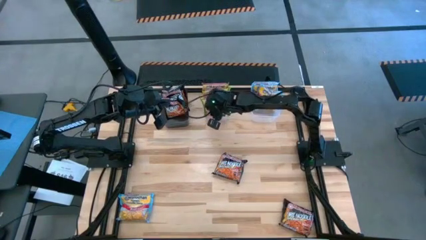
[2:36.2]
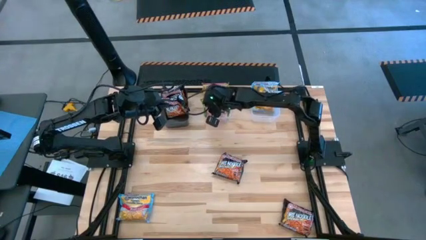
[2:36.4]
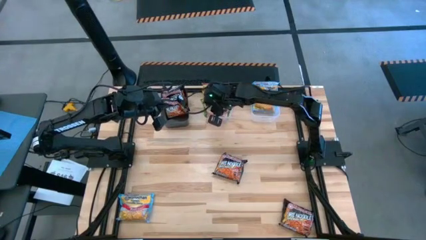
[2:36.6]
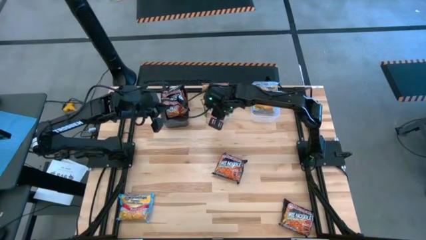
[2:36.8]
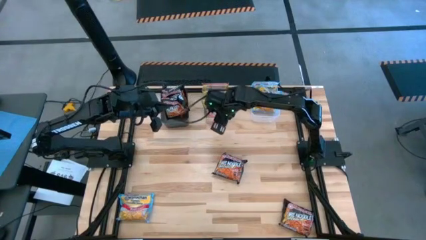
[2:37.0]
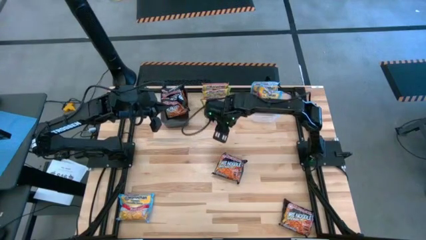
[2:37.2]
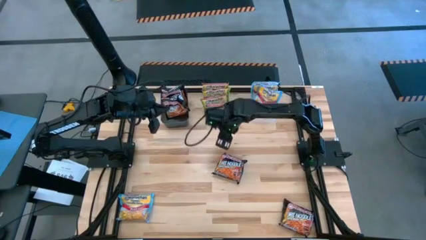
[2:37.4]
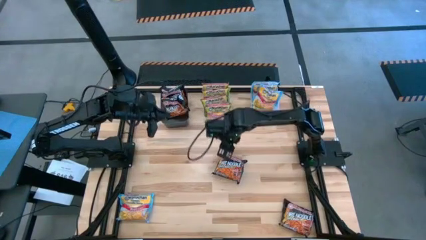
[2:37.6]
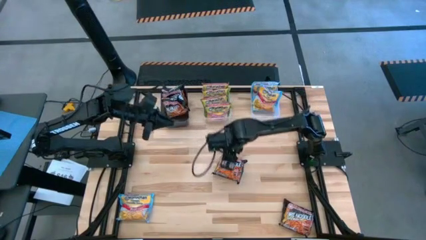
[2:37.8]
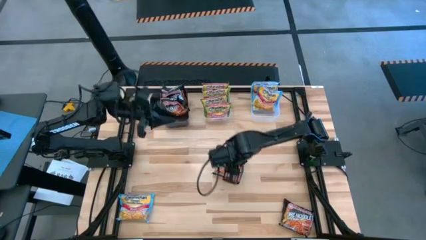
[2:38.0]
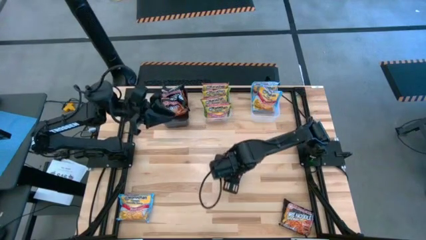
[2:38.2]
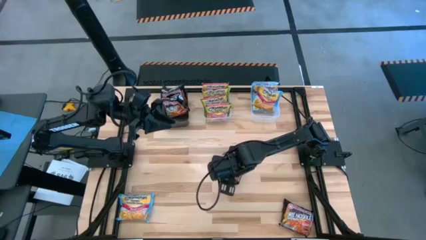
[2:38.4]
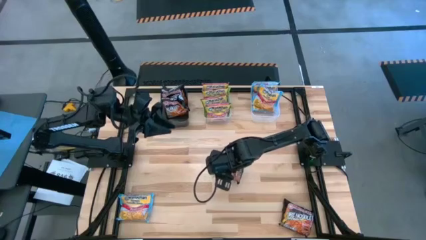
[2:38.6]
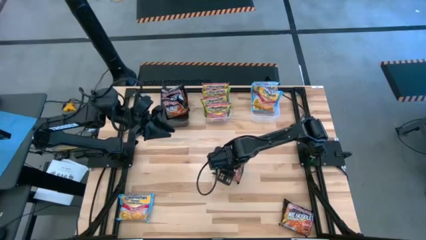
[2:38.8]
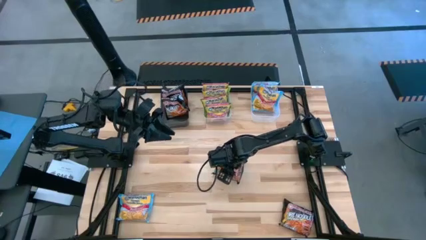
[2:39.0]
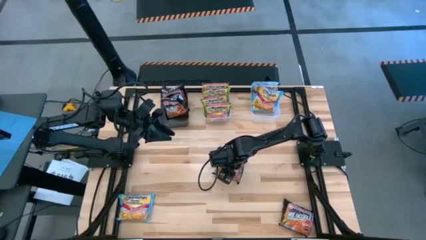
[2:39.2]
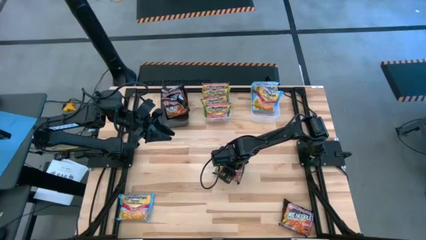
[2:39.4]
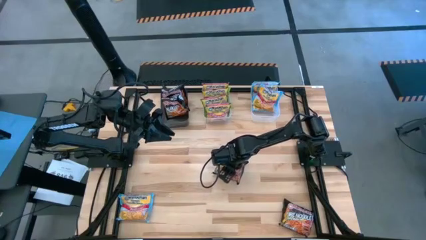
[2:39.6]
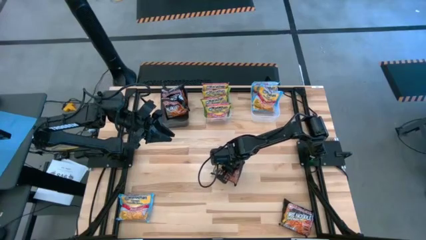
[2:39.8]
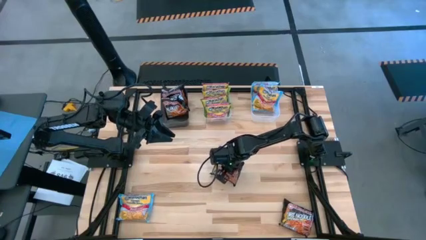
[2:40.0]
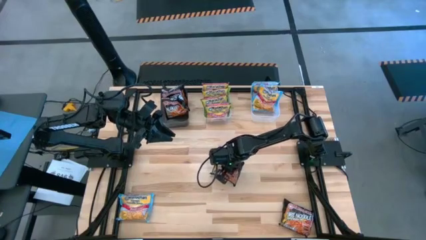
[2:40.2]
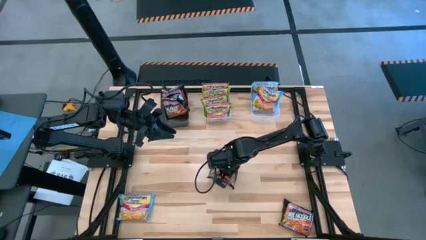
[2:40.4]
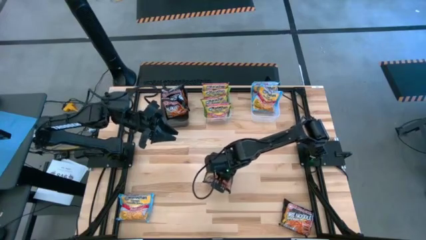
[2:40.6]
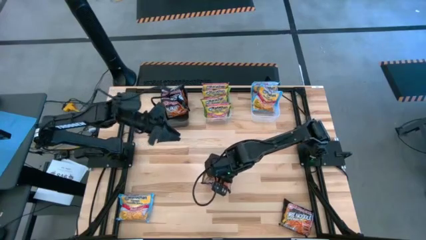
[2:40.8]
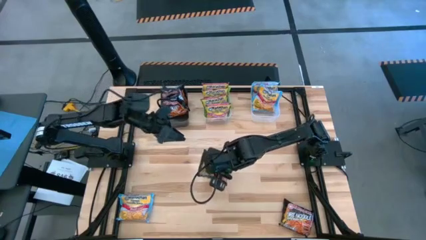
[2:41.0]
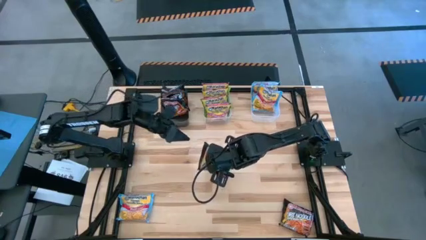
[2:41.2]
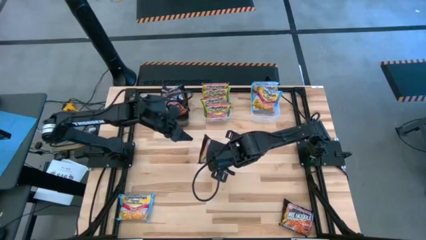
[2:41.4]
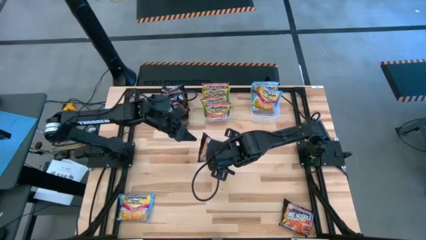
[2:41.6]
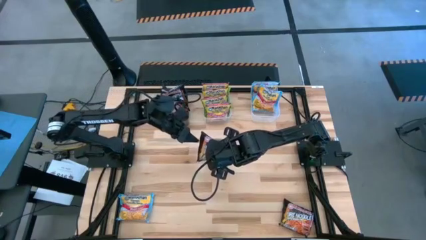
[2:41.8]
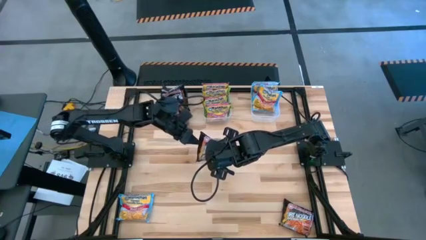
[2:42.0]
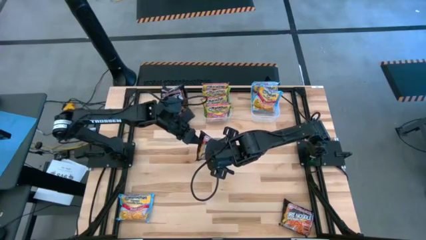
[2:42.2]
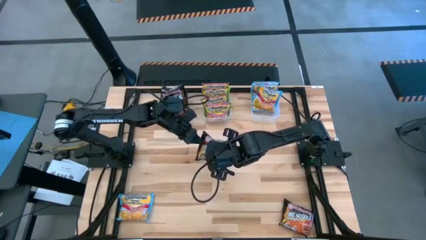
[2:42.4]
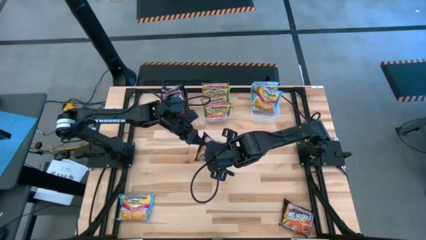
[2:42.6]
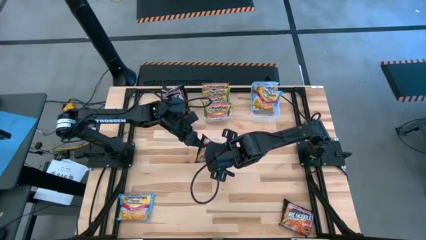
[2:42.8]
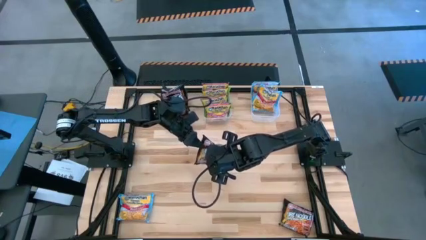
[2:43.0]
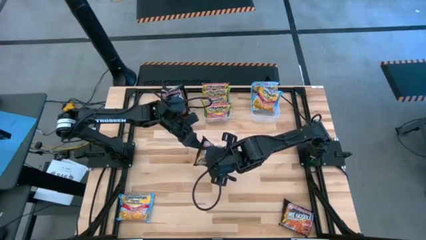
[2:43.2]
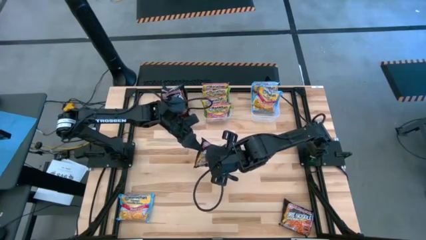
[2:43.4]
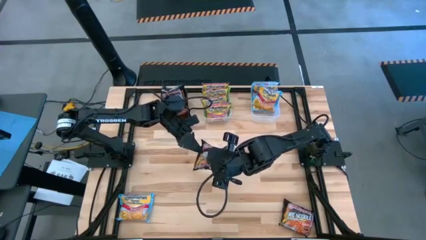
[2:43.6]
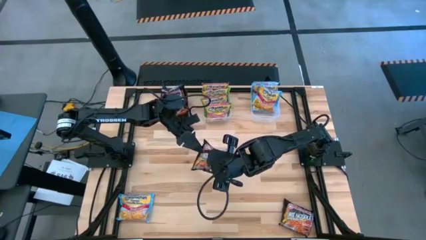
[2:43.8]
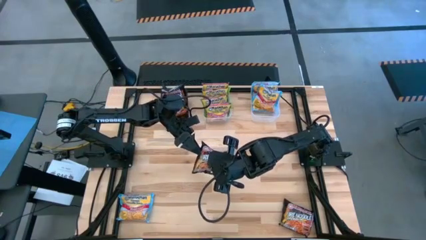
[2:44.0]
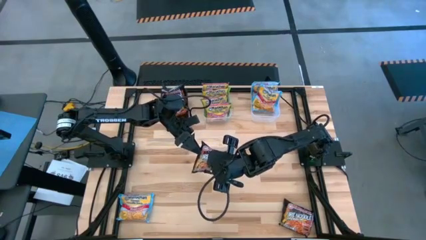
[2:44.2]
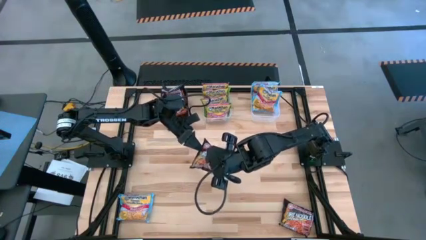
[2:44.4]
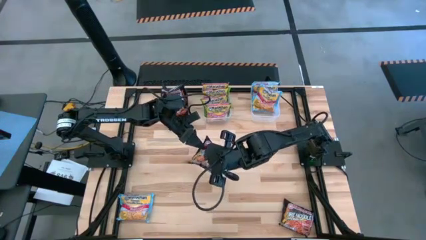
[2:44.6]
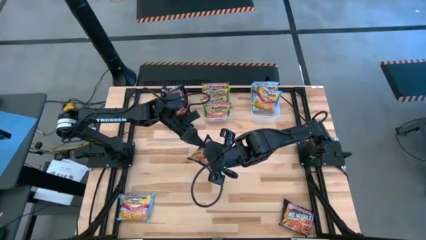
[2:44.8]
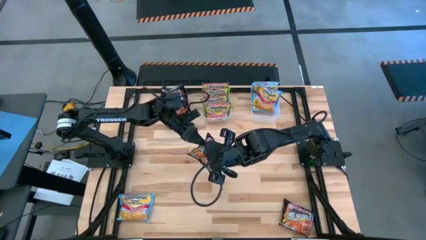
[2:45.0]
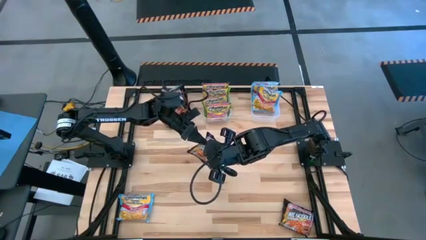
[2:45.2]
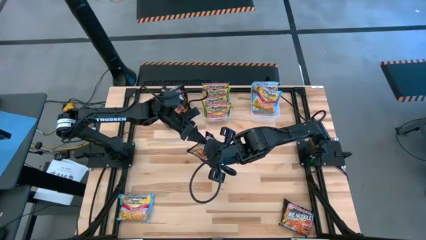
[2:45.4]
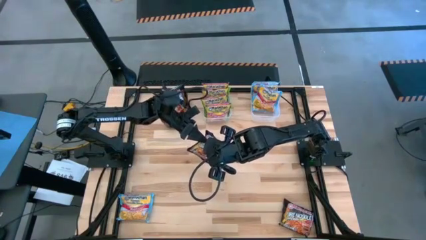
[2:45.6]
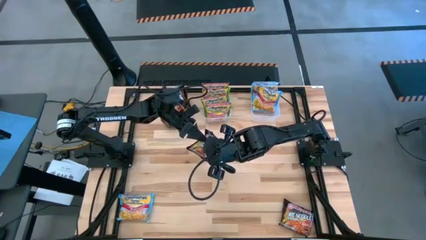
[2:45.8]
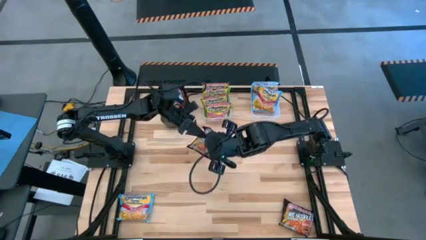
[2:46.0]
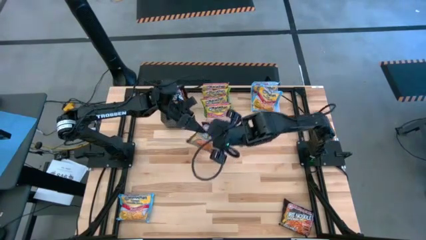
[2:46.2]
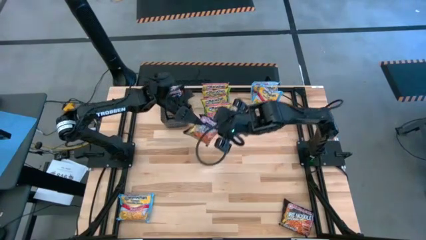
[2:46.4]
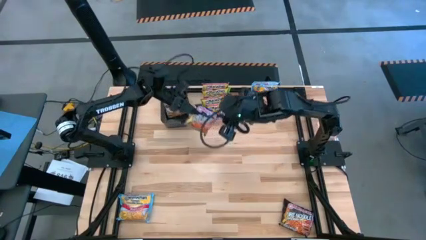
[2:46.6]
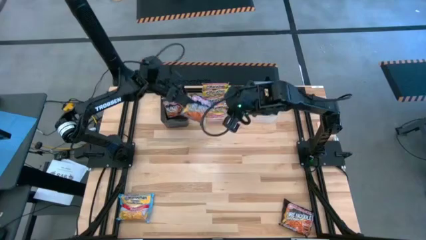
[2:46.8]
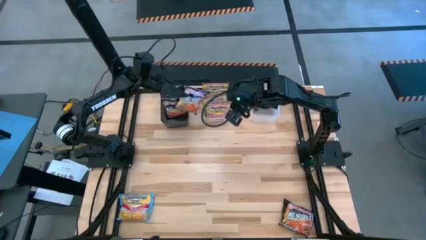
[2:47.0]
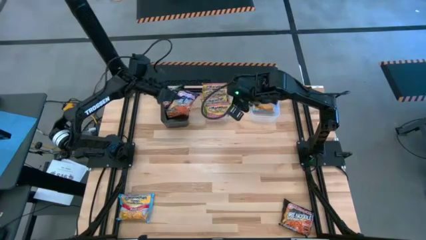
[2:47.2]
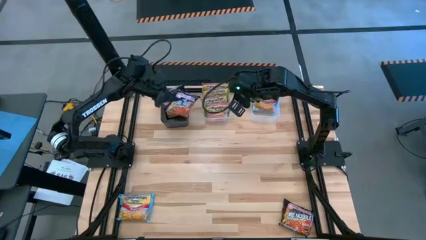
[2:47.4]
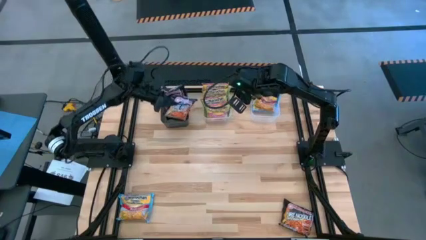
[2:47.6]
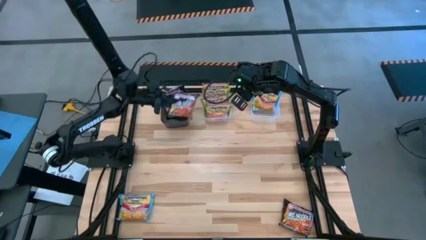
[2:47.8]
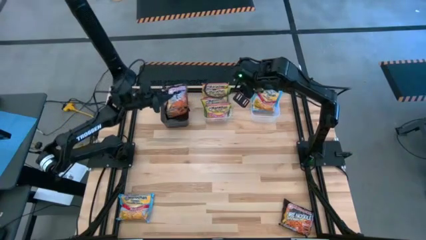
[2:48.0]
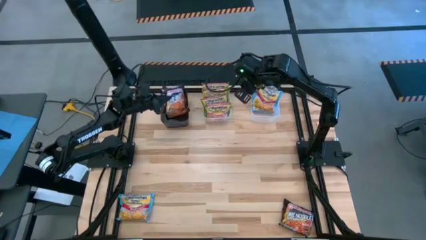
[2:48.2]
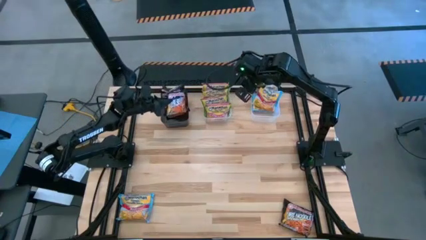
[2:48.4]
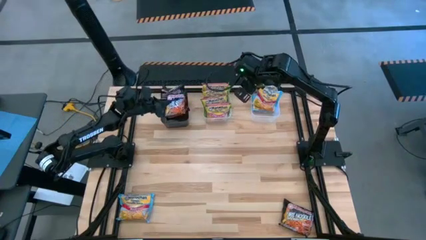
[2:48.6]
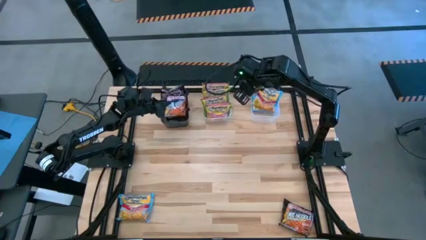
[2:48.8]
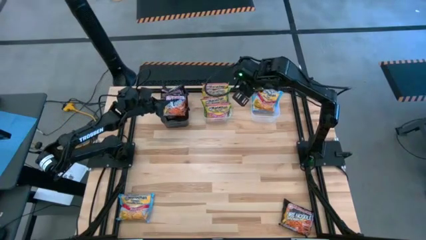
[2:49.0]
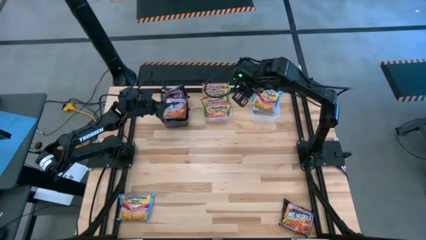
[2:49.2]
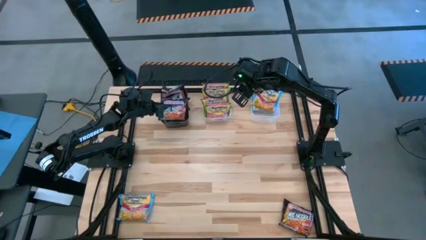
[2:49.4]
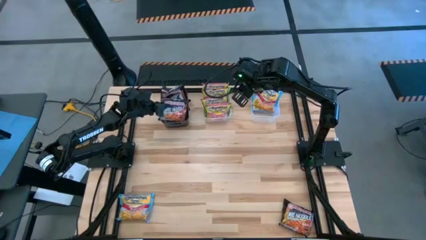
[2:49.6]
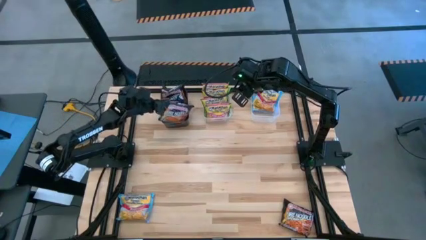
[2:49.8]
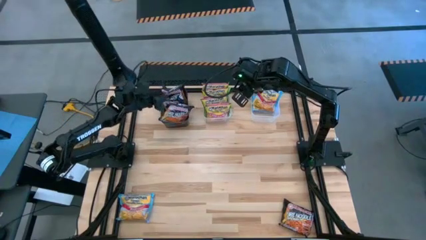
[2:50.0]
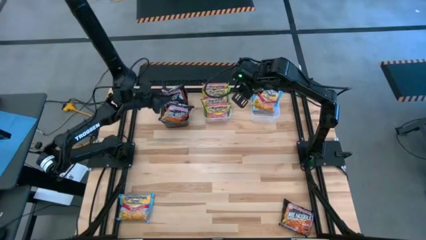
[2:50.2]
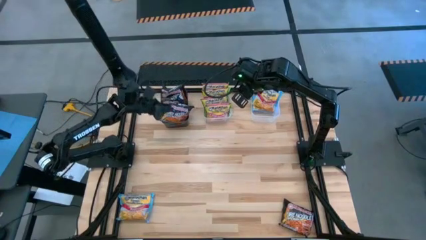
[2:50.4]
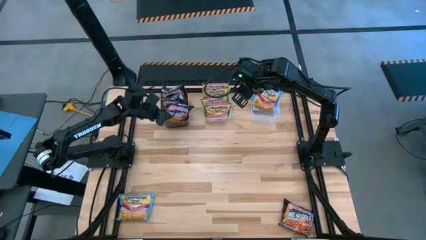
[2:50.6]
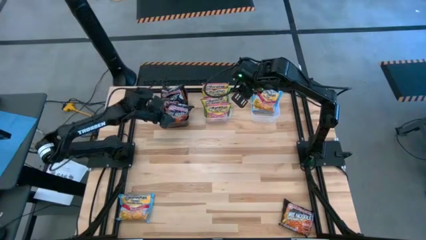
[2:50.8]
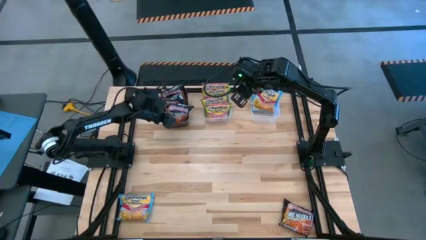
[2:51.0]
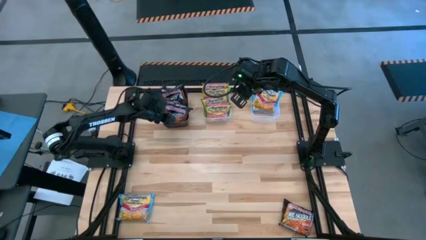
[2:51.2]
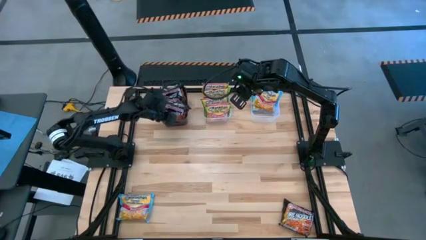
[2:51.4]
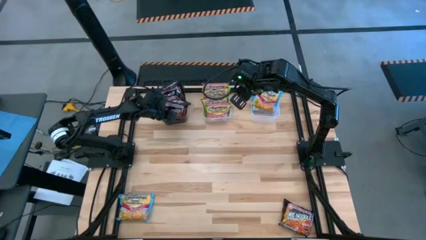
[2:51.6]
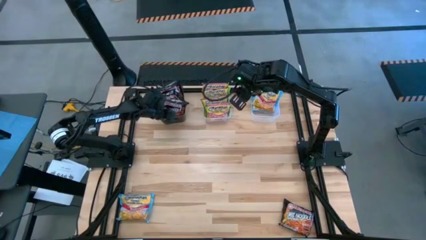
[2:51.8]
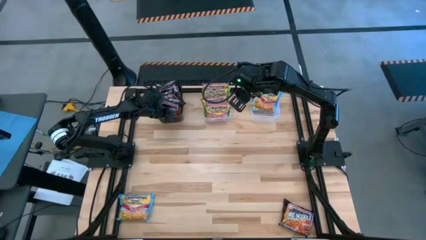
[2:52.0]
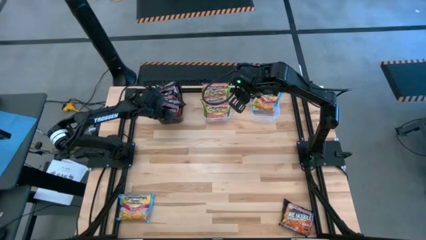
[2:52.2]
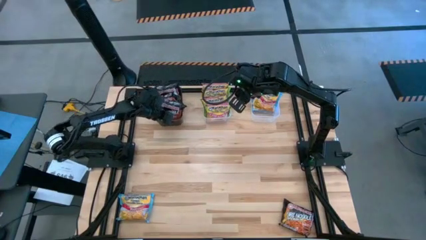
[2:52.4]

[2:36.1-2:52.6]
Task: Sort Maruchan noodles
Put the black noodle pack into the black bin

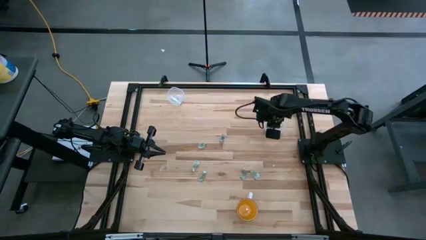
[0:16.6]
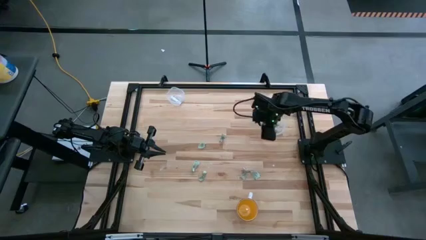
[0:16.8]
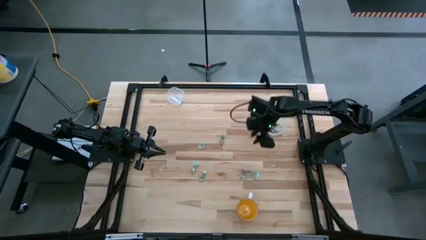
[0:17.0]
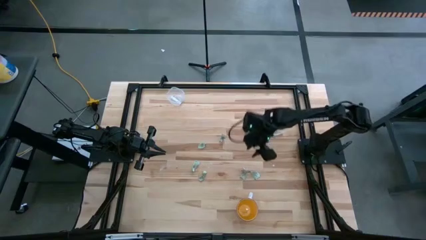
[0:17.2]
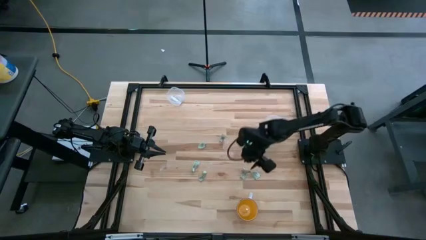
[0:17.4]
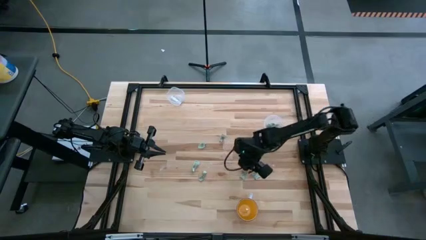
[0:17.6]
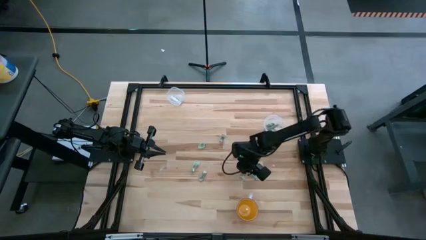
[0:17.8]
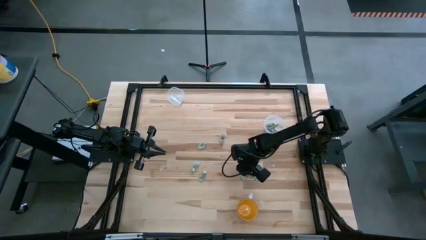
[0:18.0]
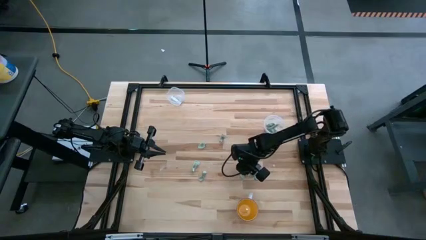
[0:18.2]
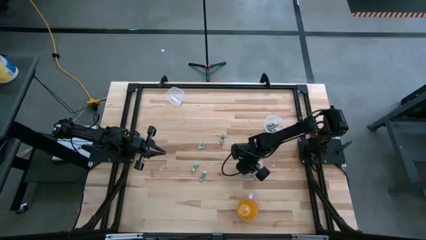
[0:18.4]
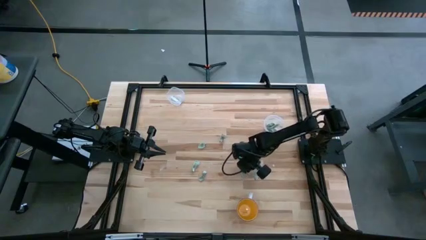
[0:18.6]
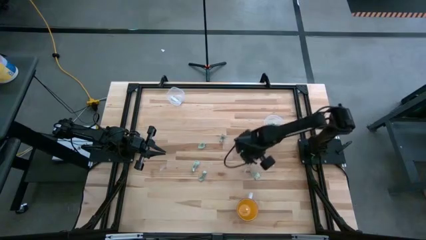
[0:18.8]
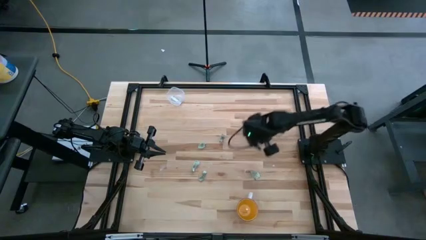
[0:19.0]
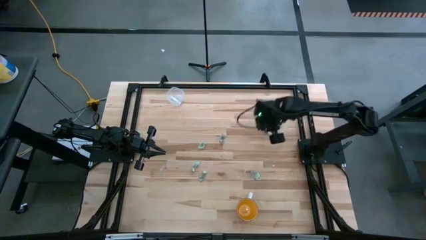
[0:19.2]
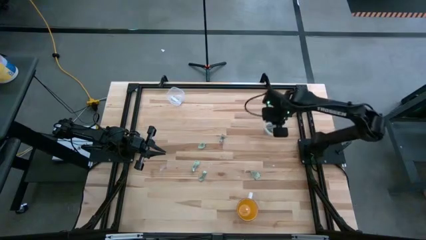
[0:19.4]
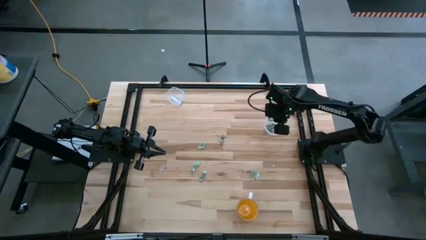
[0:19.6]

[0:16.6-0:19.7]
Task: Pick and place items into bin
Put the stevia packet into the bottom transparent bin
